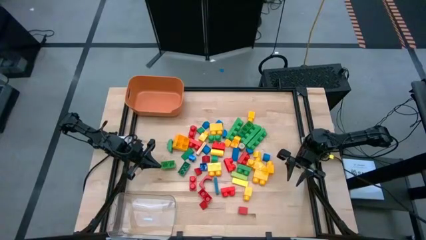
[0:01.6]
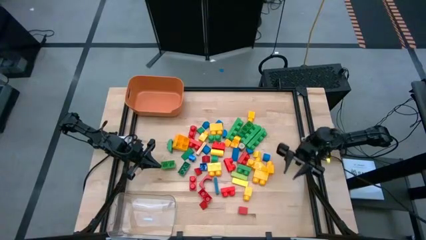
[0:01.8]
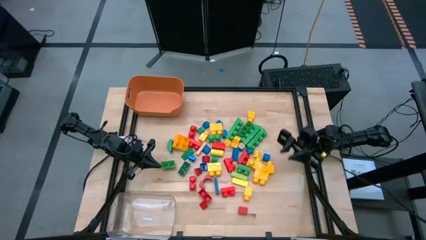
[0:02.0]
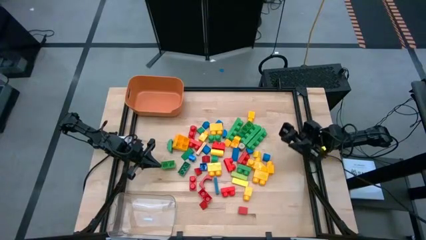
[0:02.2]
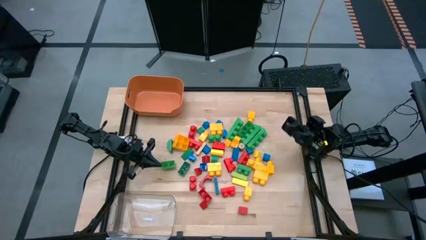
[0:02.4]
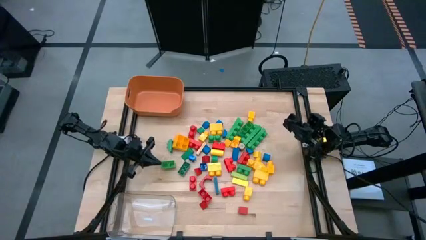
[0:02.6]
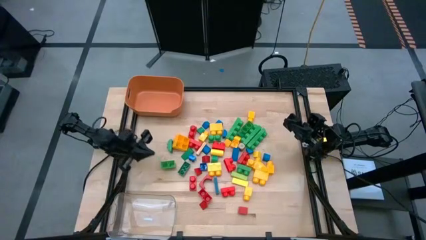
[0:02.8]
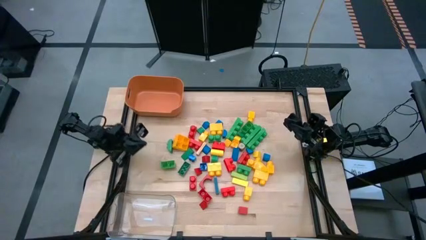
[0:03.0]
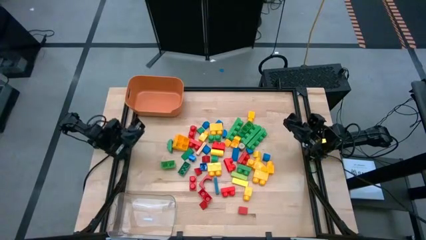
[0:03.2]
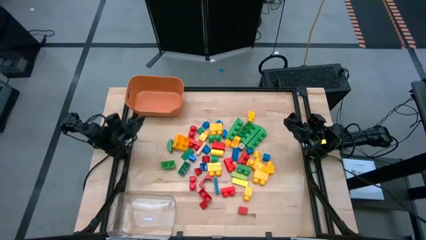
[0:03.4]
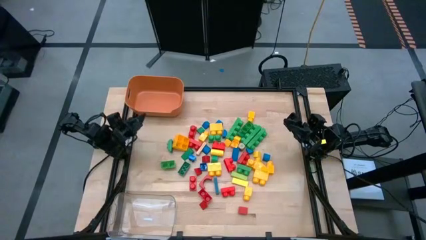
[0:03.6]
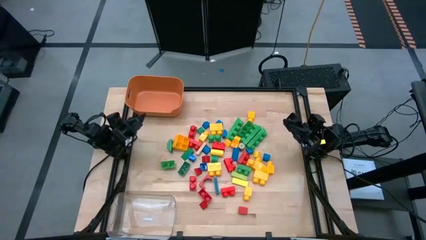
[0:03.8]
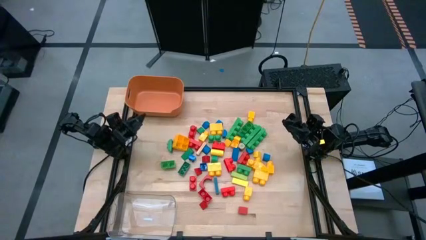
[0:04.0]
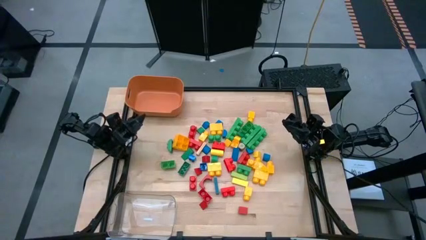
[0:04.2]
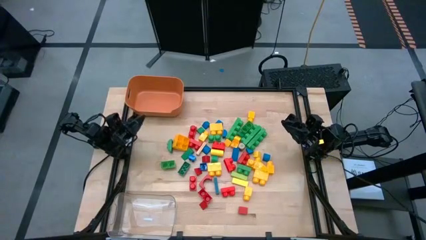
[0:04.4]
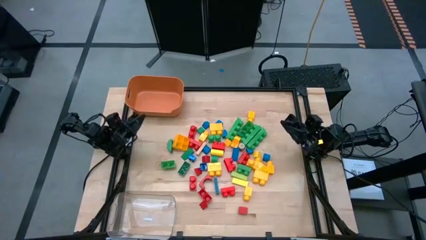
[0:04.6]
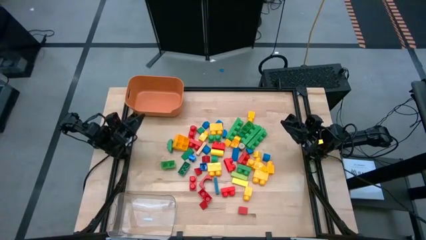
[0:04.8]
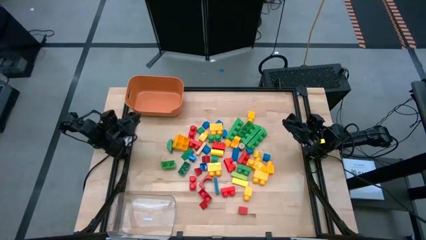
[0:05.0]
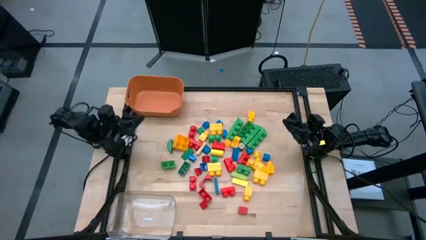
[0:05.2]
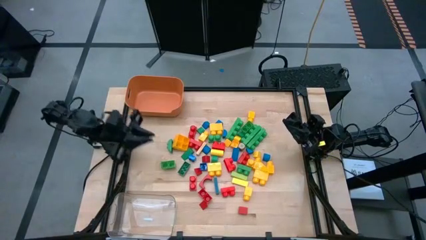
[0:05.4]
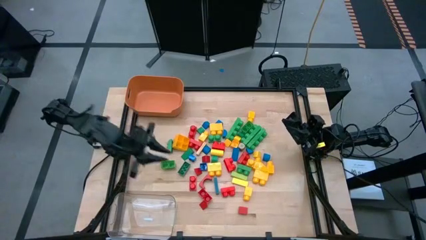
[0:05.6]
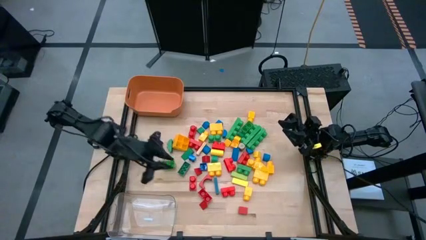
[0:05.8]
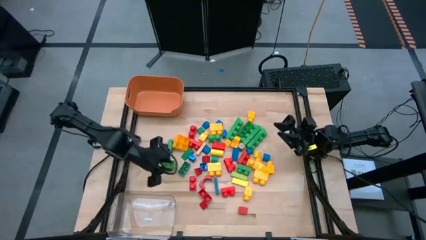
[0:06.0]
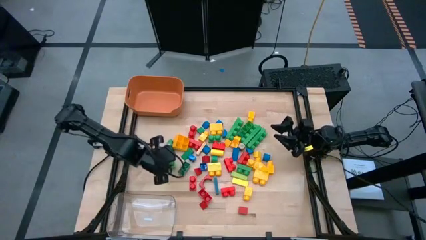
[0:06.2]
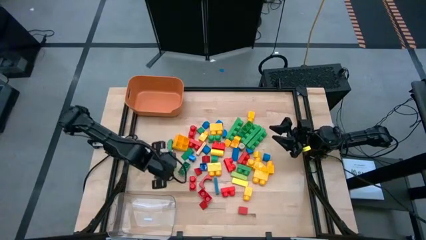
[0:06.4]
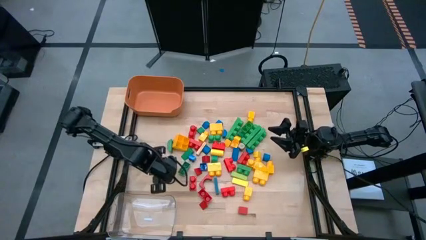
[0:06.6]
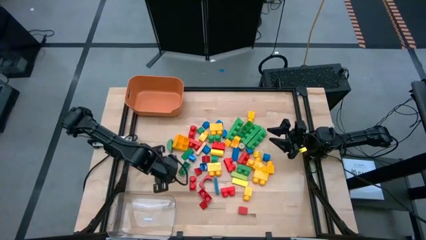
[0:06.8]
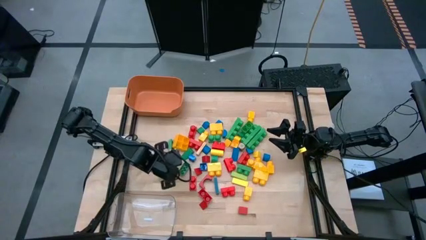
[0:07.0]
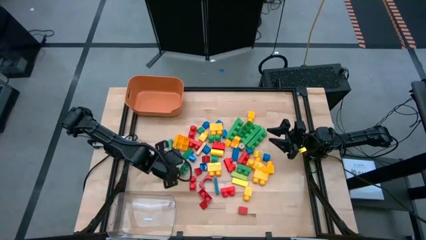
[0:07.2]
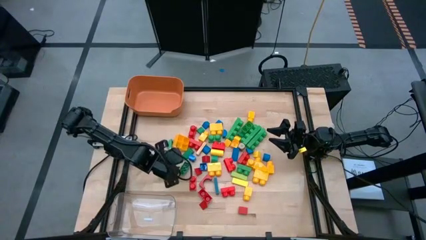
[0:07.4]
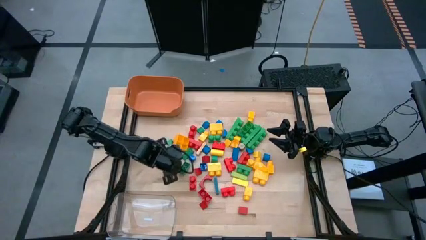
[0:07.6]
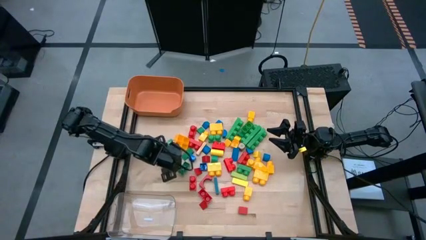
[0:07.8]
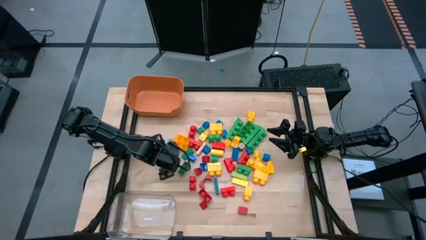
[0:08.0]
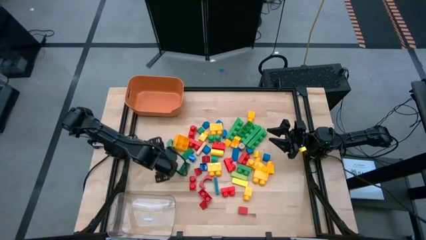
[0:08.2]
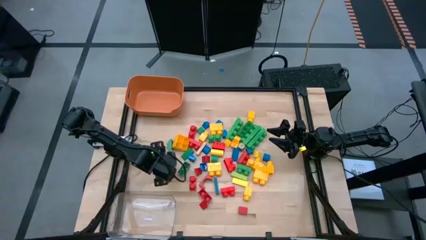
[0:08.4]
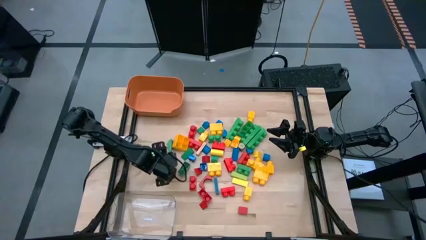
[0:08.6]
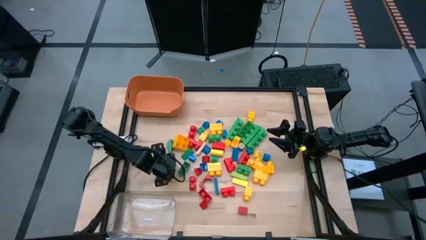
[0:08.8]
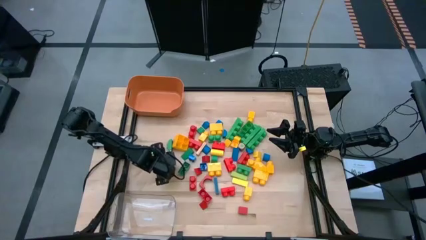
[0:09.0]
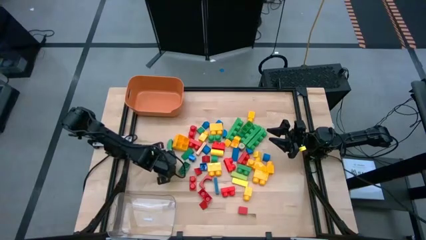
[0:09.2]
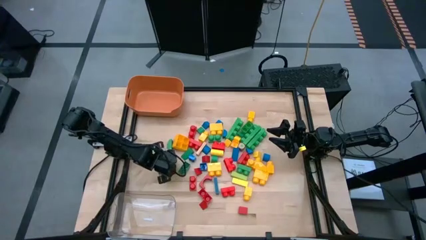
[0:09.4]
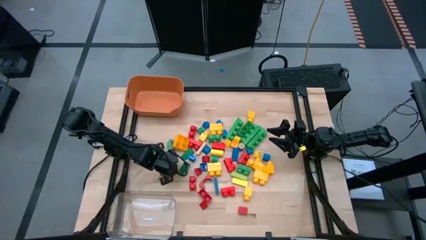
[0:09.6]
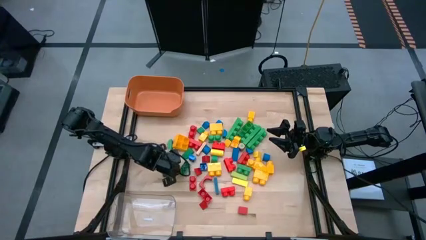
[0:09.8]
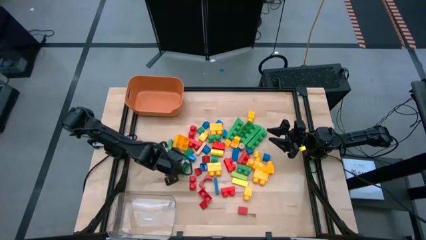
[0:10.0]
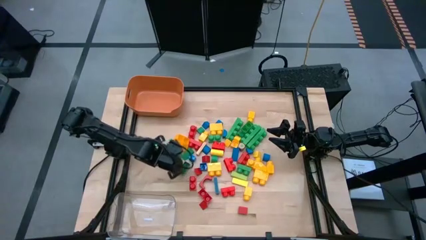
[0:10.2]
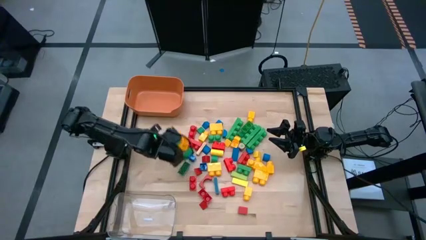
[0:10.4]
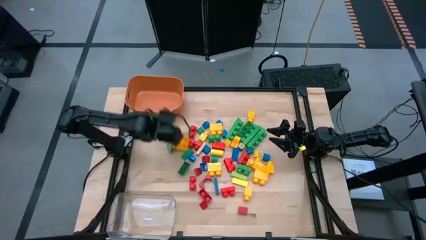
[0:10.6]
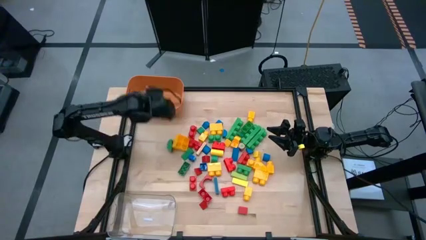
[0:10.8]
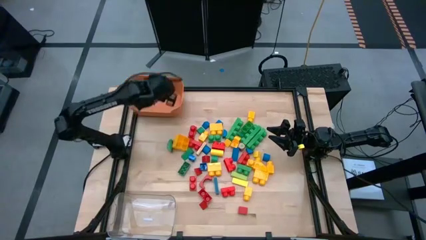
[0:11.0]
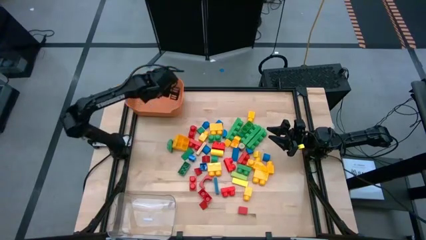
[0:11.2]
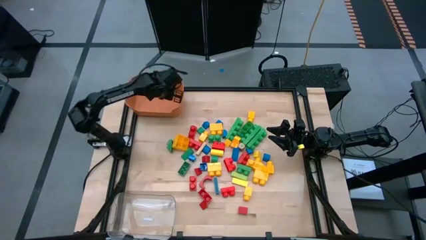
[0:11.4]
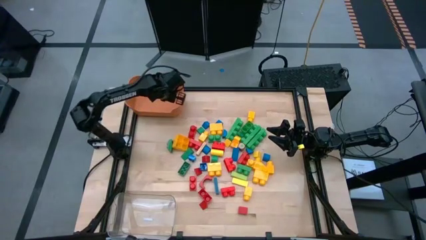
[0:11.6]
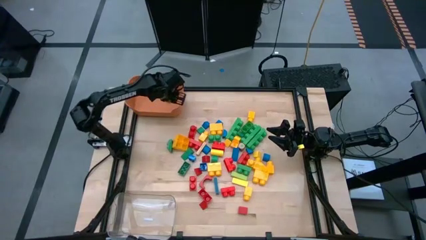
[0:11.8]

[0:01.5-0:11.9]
Task: Sort blocks by size
Put the big green game piece into the orange bin

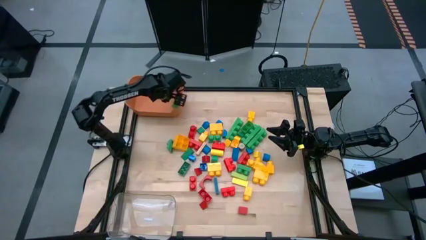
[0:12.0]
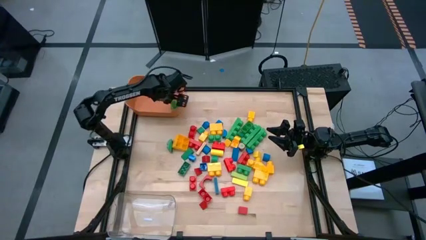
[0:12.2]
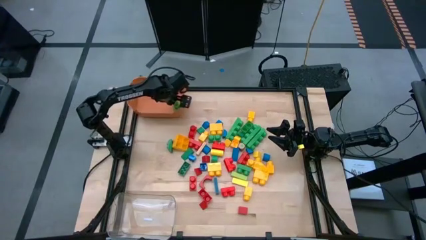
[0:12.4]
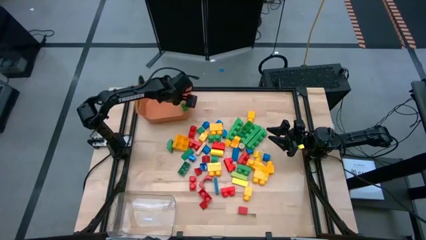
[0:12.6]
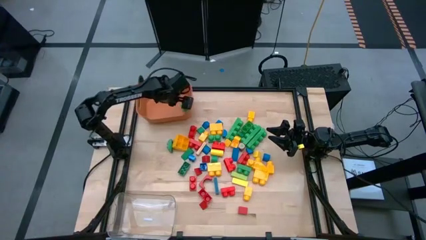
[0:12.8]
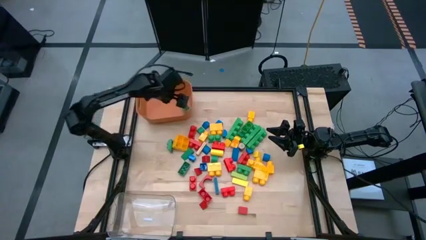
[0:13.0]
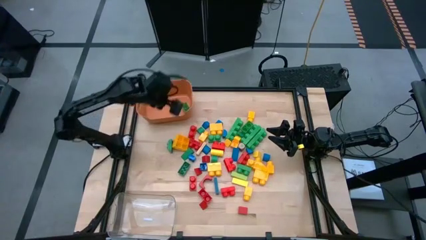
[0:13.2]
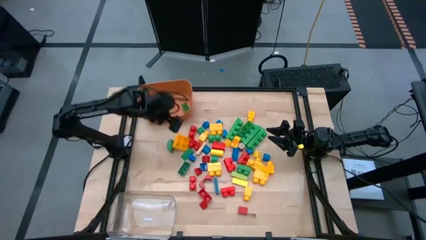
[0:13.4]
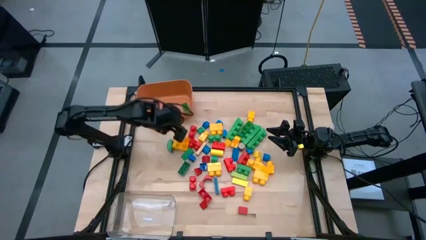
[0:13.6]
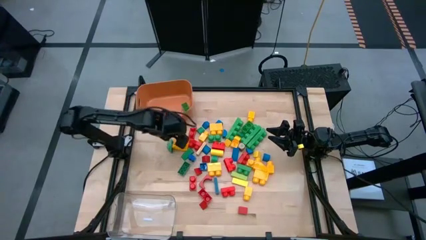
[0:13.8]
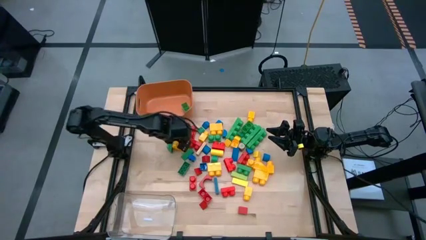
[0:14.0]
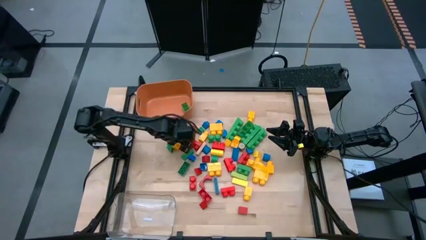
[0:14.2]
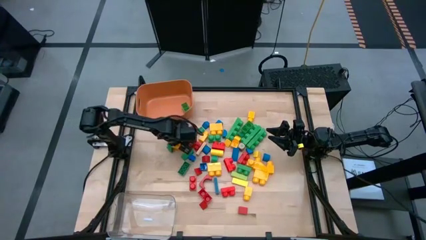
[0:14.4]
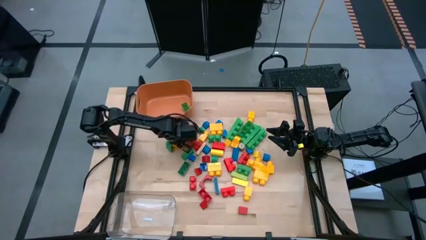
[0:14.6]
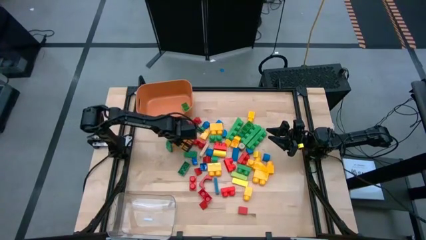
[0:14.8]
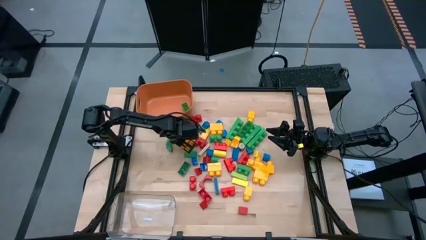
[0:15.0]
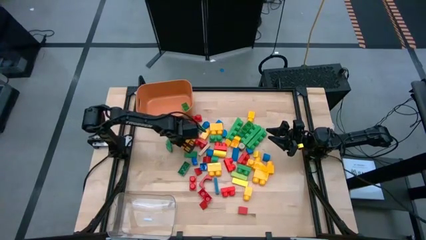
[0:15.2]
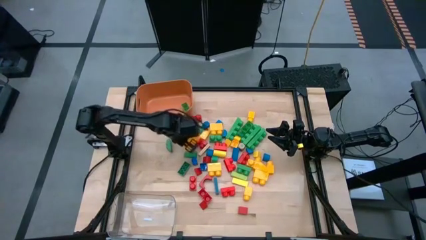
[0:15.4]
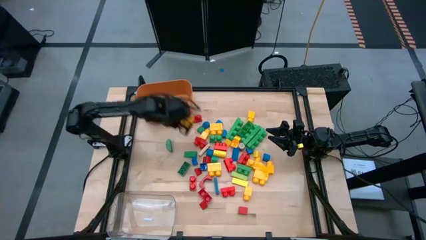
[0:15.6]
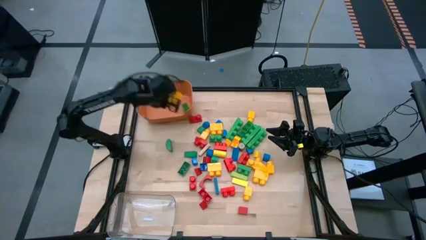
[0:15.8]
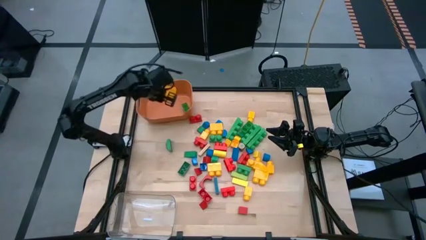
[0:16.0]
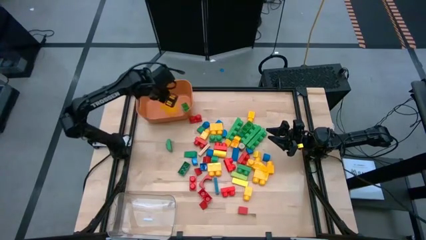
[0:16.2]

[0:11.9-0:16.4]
Put the big yellow game piece into the orange bin

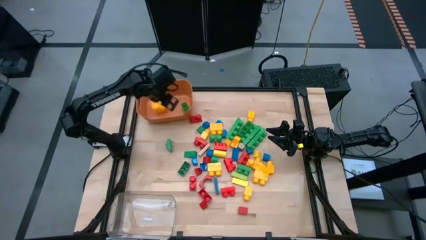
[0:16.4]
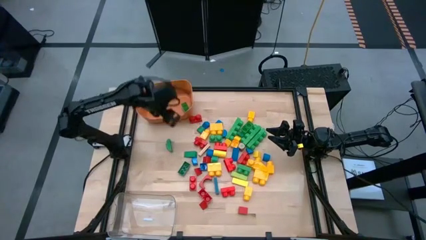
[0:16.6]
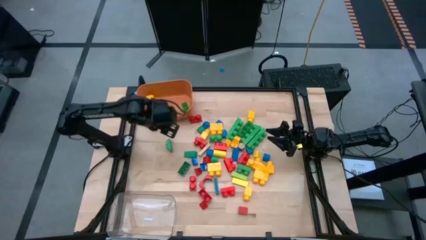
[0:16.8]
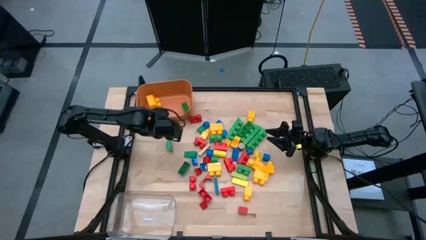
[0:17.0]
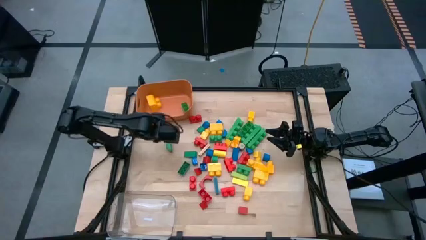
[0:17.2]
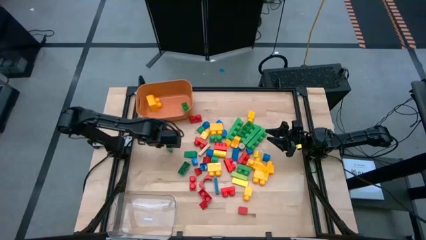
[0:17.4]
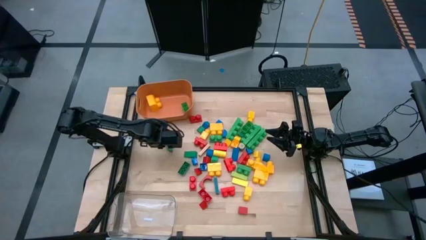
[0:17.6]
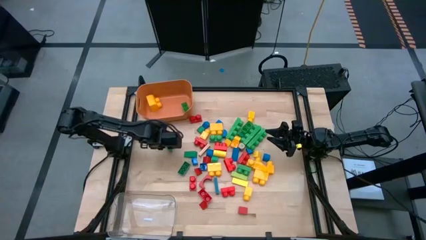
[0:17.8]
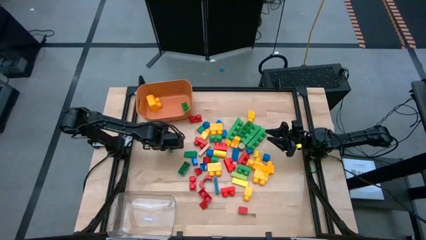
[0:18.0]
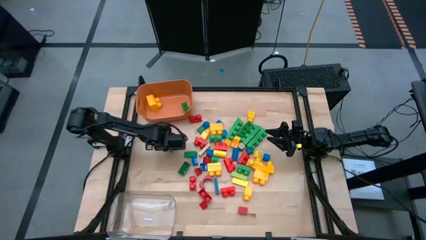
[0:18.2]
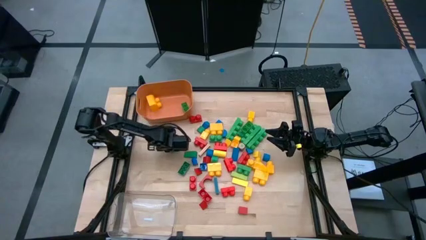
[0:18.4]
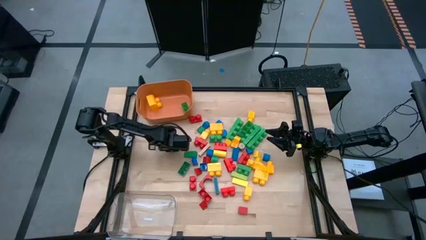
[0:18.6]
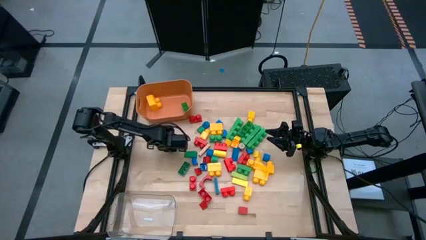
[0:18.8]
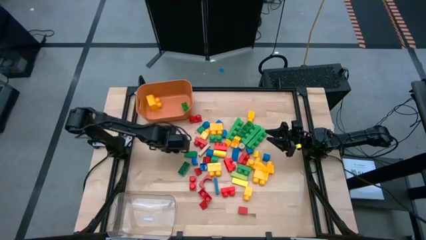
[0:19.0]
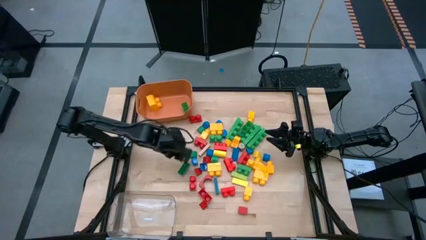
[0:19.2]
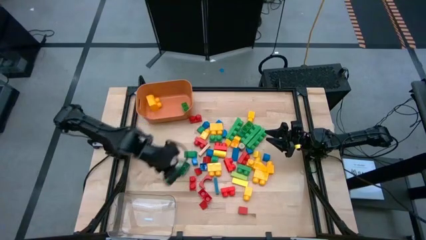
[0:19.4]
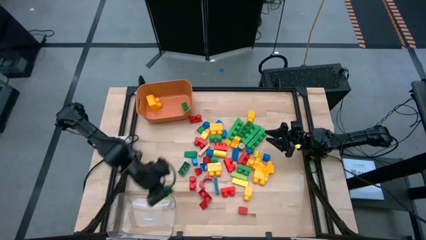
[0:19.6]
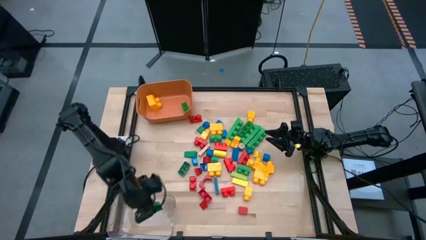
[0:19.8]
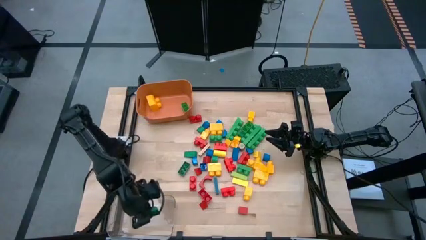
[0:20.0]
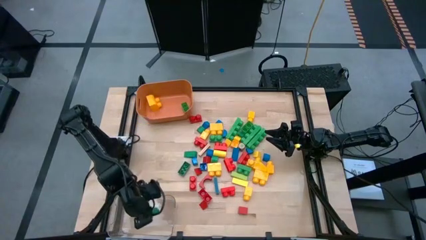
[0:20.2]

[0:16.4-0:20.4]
Put the small green game piece into the transparent bin
